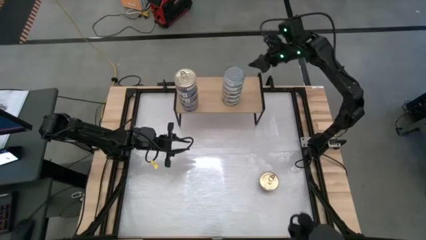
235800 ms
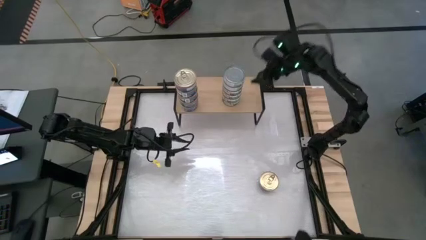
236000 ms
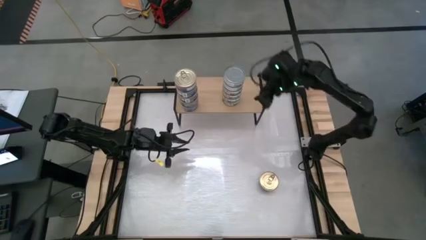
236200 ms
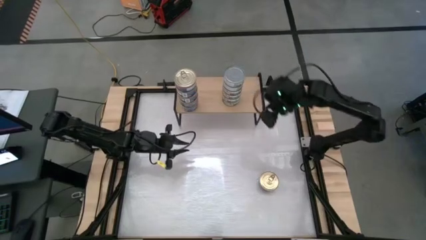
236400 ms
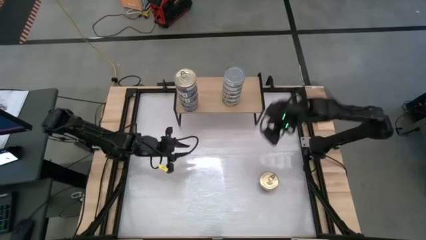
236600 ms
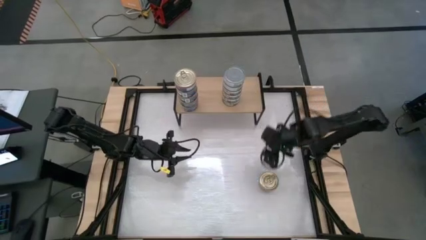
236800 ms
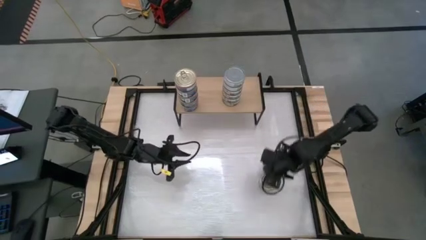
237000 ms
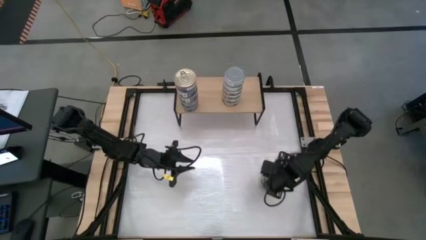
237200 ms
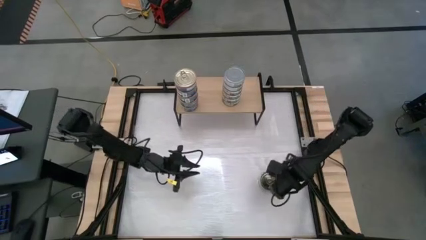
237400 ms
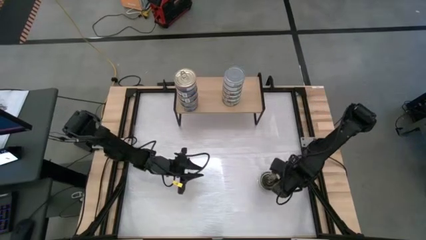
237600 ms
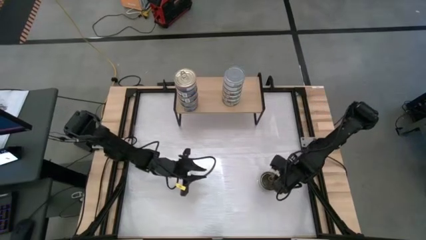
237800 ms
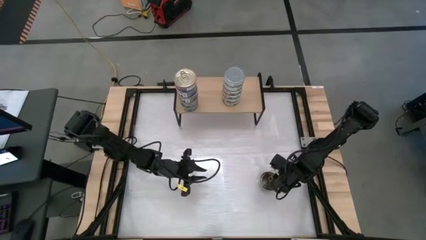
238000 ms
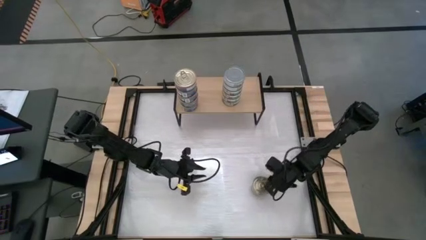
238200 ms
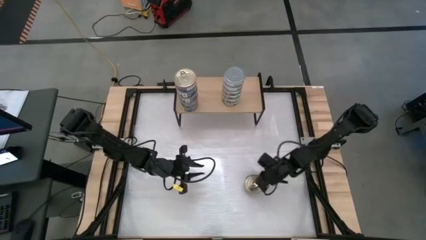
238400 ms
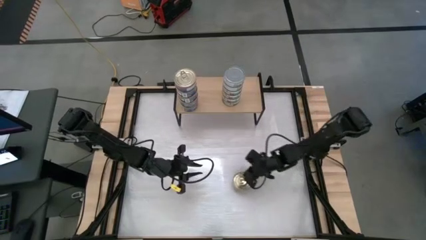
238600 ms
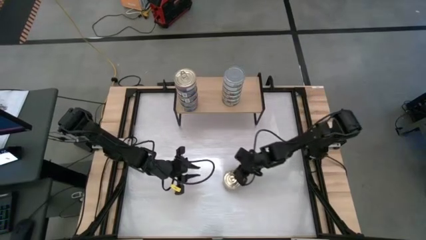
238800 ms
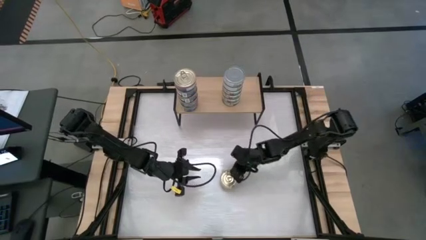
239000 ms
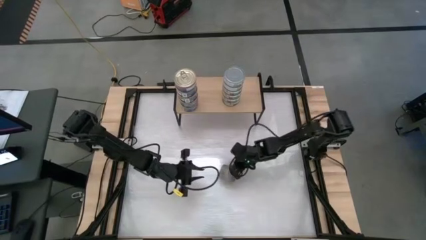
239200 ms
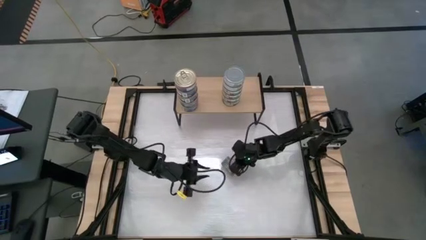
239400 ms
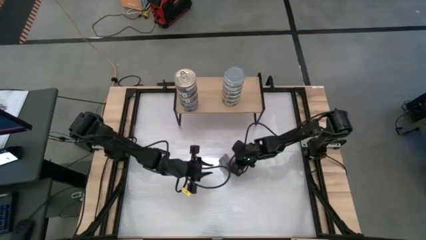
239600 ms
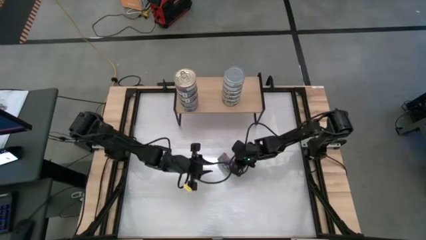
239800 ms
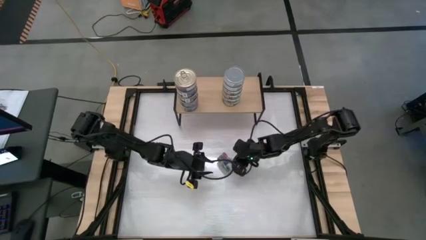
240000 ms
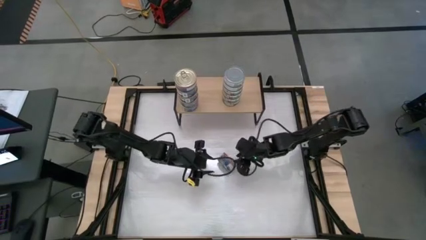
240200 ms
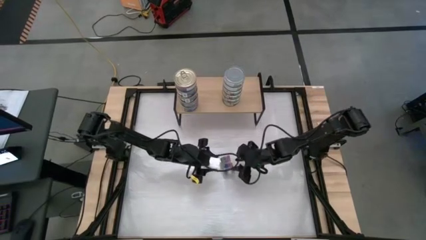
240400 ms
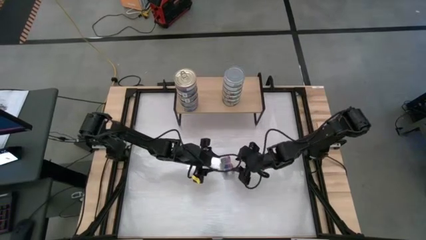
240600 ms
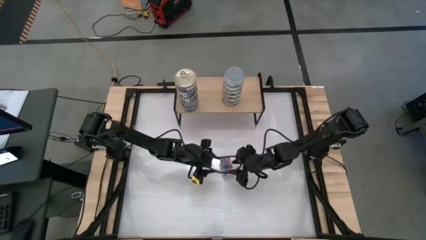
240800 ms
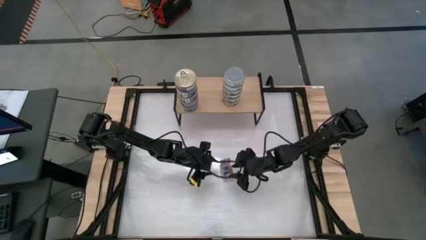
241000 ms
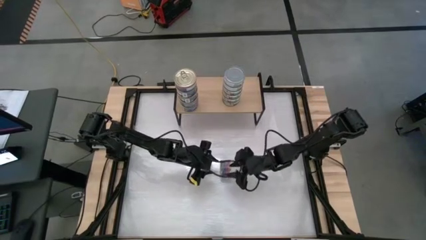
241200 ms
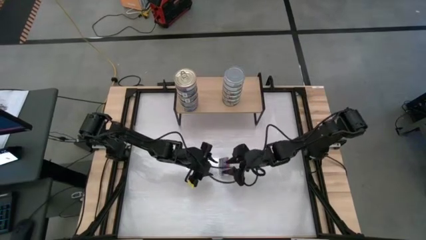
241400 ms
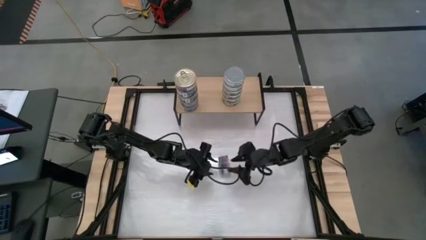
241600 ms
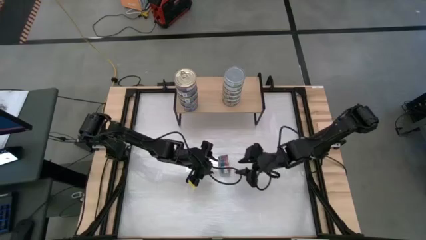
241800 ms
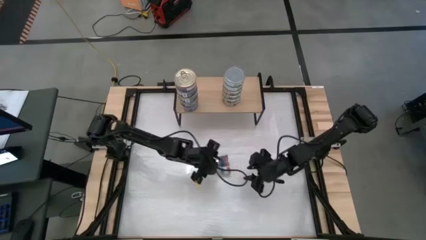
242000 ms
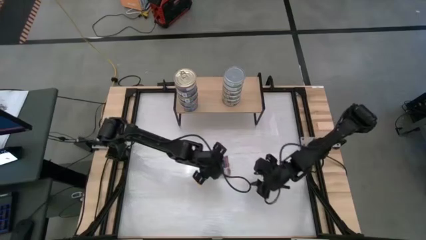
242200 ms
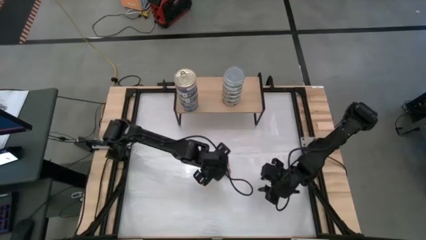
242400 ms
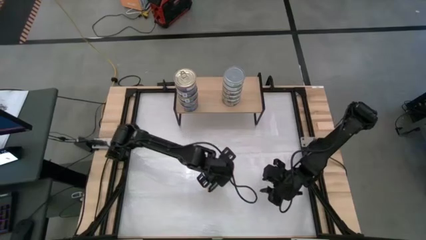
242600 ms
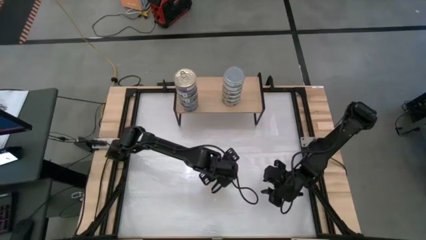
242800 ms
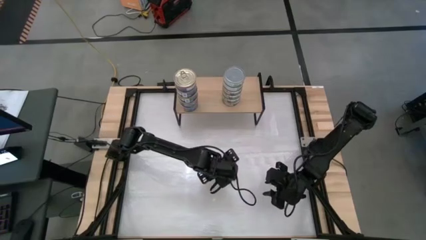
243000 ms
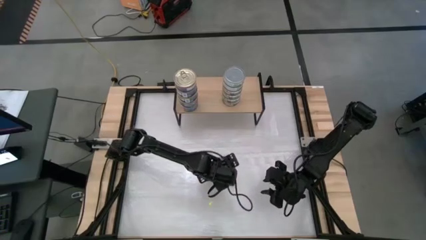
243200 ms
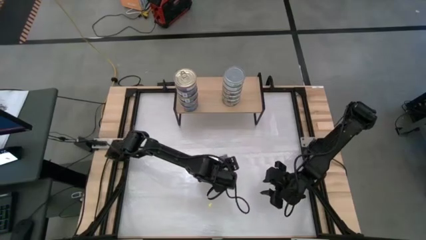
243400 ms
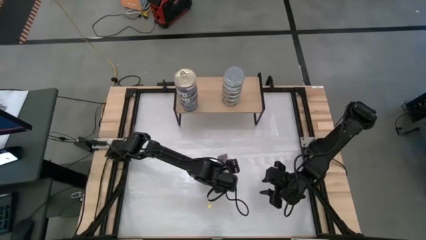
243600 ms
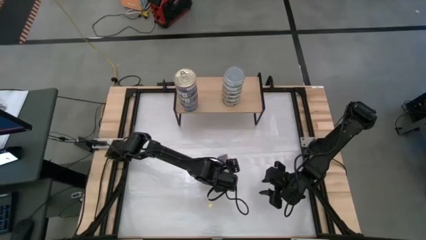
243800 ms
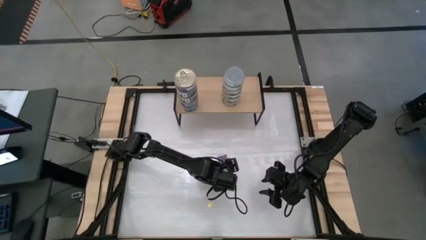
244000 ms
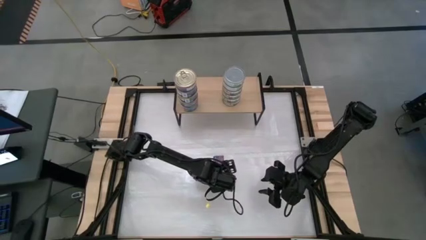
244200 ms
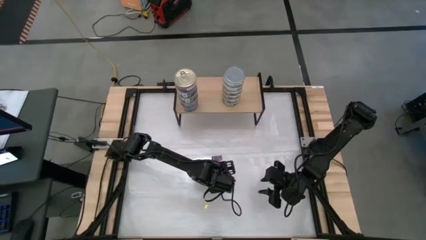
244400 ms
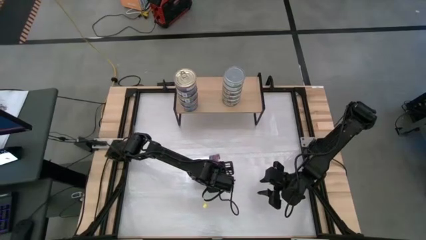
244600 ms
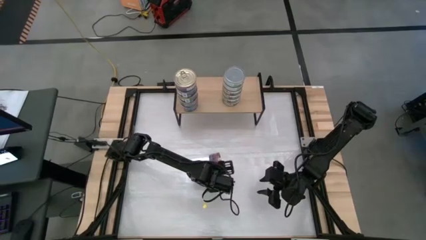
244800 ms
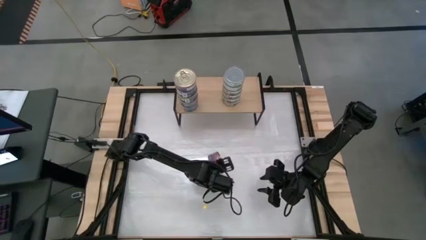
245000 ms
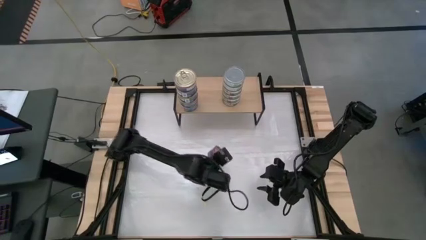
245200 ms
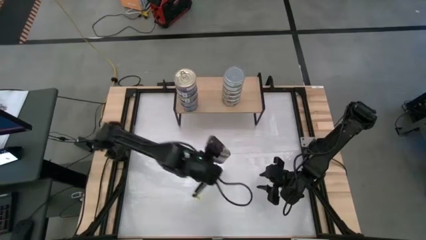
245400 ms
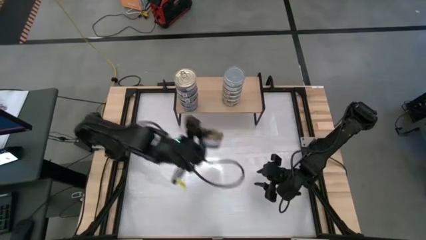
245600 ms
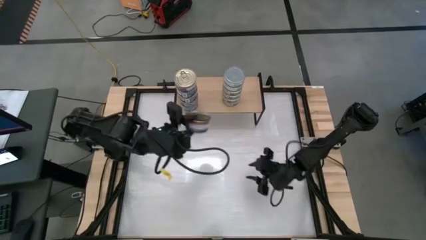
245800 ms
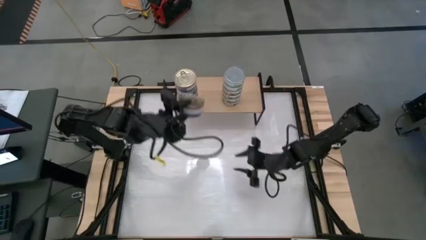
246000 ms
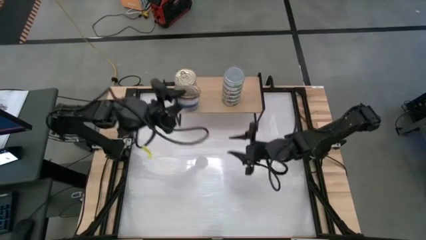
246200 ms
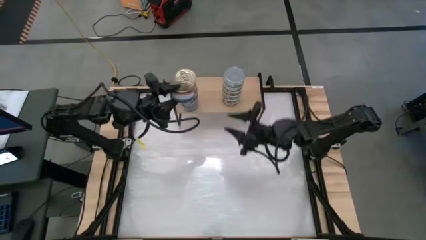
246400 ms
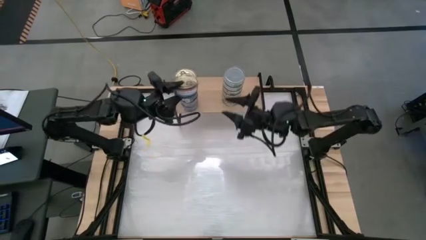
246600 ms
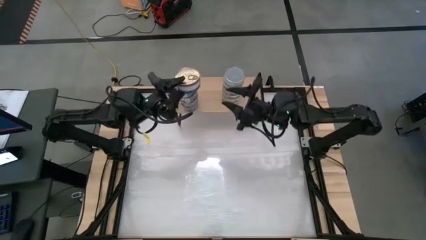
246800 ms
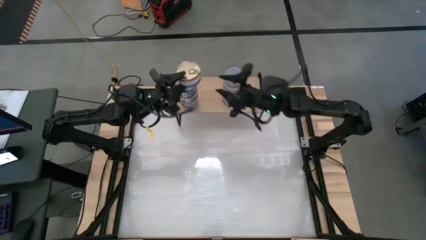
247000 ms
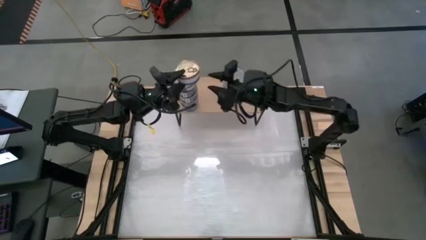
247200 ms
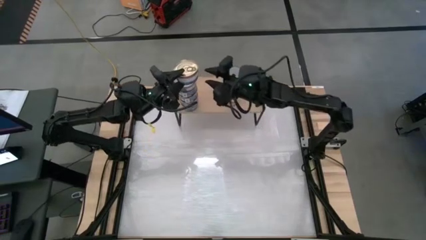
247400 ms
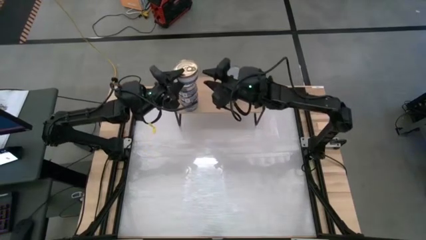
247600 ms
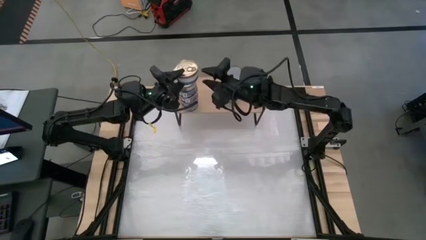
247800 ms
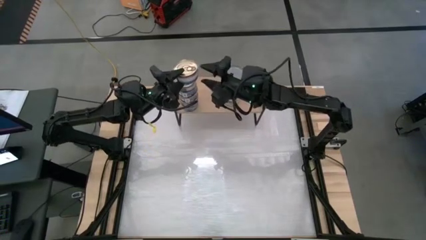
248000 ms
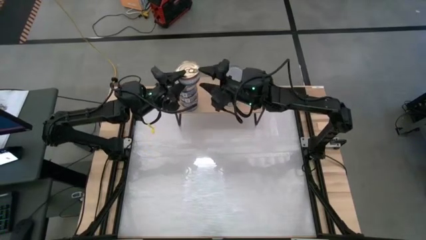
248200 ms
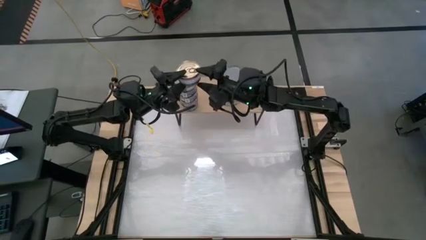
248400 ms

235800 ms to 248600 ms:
Task: Stack canned seafood by type on shelf
Stack the blue tuna can on top of the other blue tuna can on the shelf

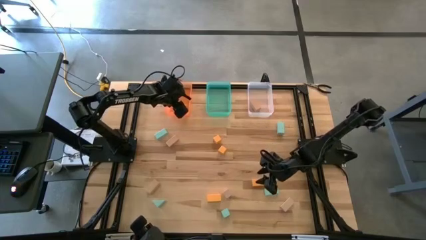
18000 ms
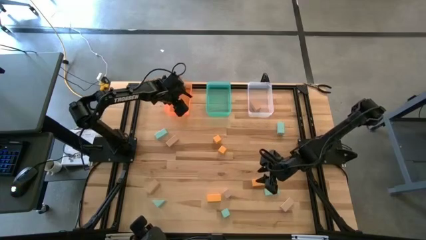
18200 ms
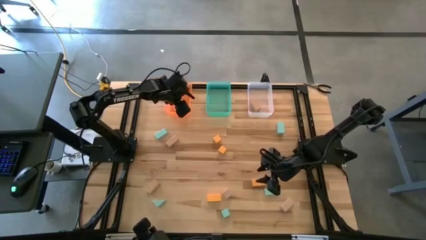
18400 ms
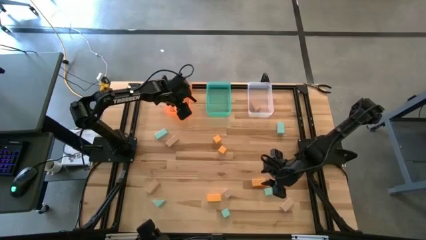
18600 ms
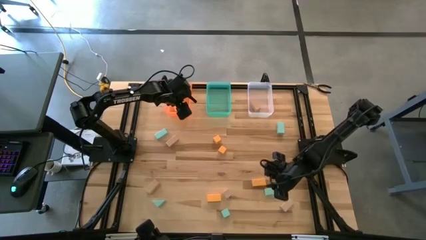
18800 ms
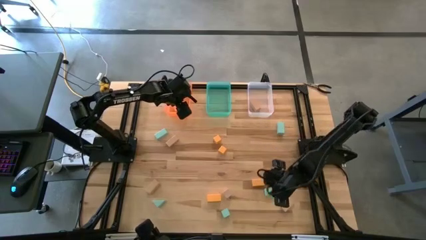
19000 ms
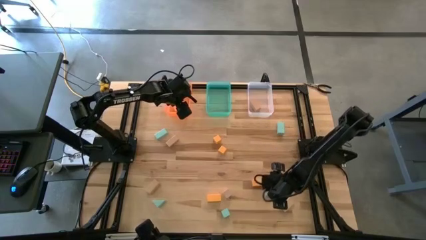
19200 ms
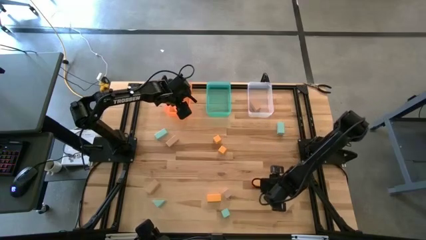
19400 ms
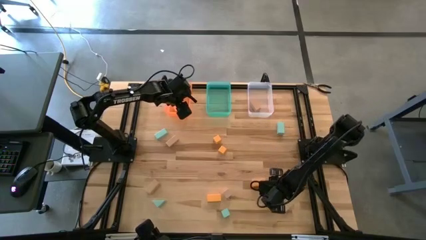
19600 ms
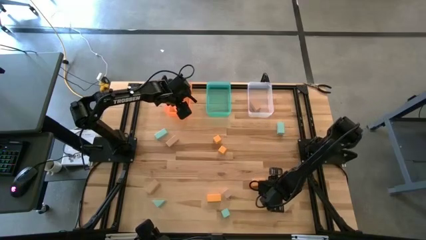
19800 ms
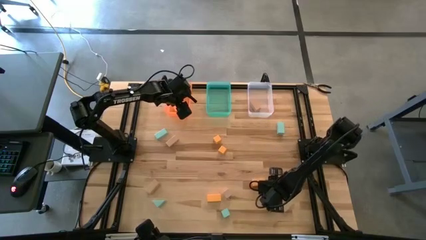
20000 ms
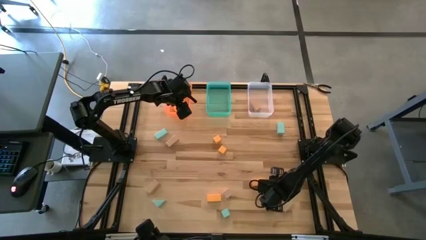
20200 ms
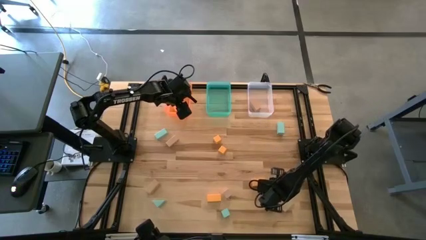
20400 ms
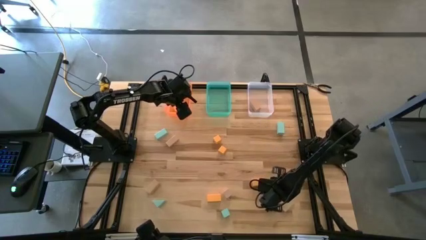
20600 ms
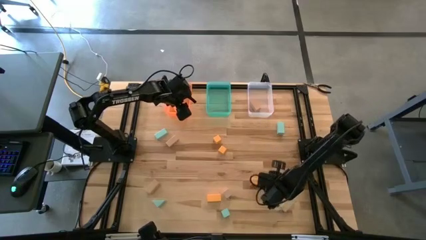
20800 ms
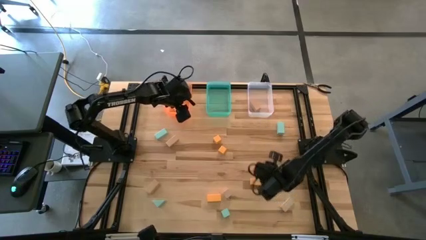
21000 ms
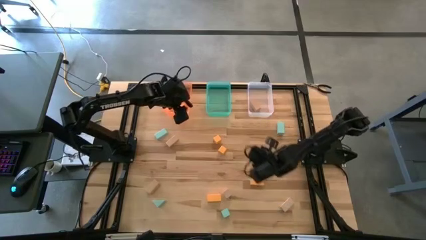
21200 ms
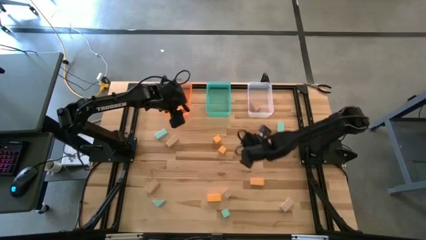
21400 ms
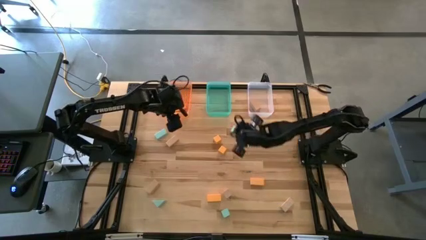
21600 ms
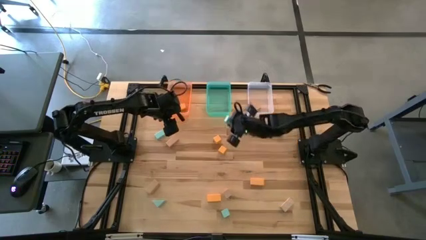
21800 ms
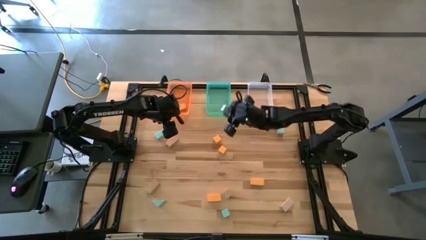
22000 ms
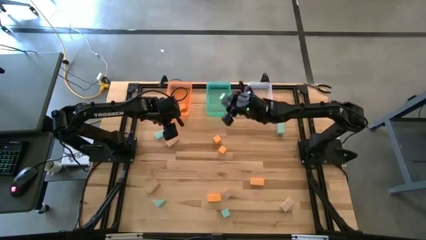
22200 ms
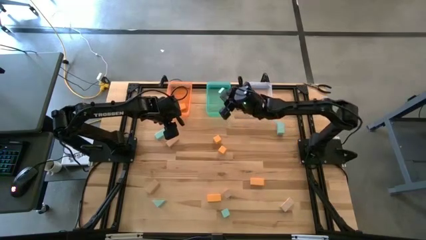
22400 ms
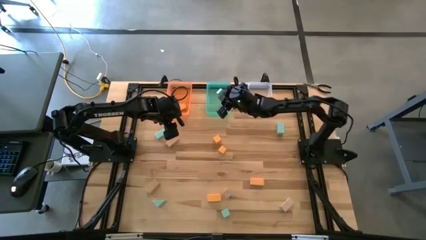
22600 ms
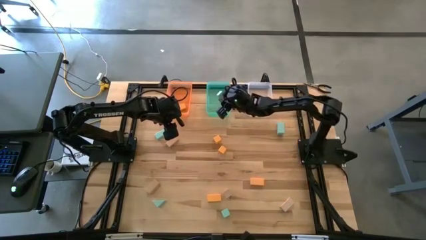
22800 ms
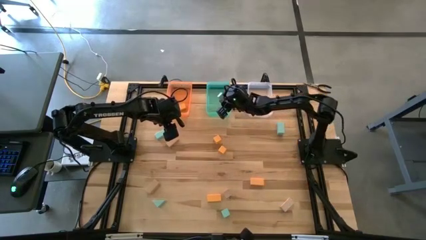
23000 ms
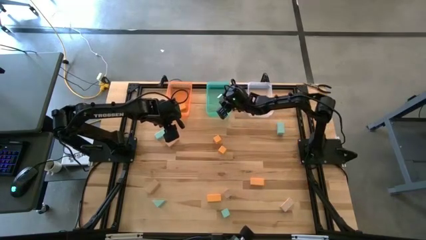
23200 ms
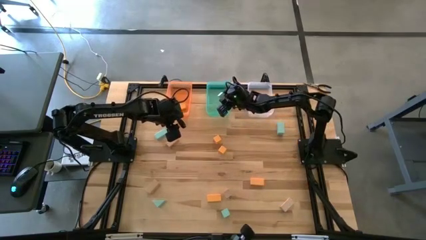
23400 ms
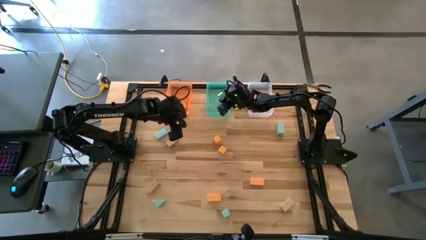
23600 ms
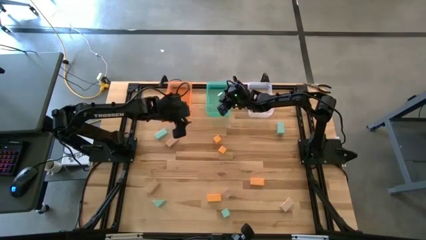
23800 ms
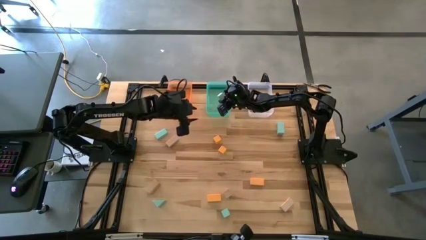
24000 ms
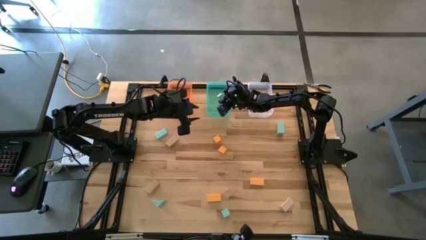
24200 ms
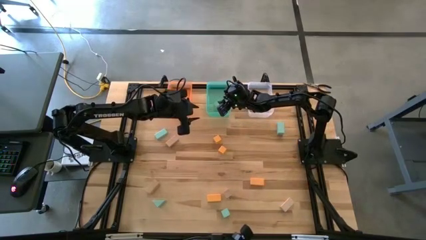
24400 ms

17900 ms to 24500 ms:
Task: Sort & place blocks by color
Put the blue block into the blue bin
